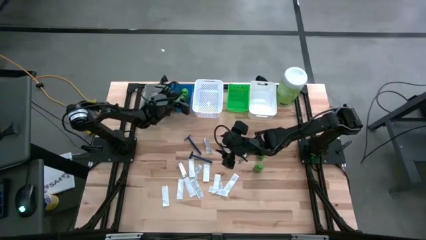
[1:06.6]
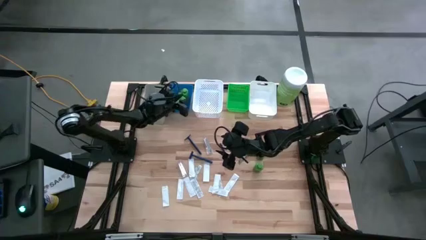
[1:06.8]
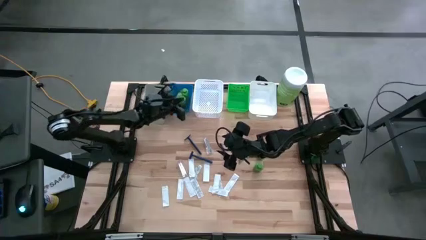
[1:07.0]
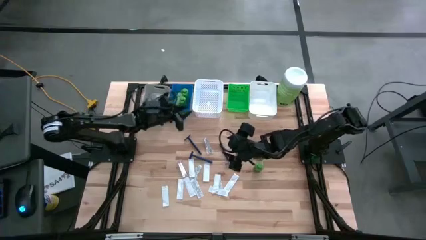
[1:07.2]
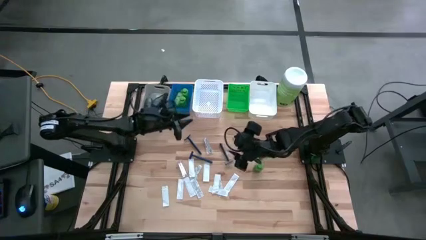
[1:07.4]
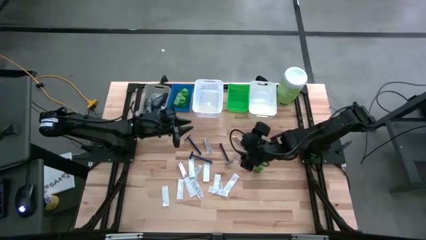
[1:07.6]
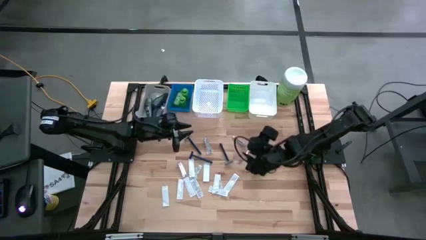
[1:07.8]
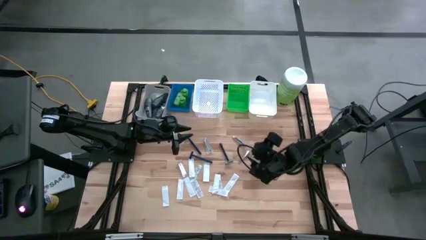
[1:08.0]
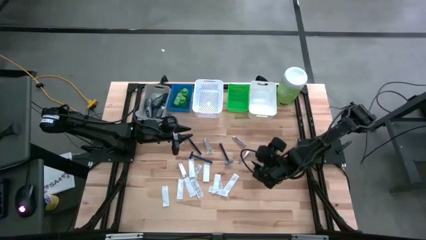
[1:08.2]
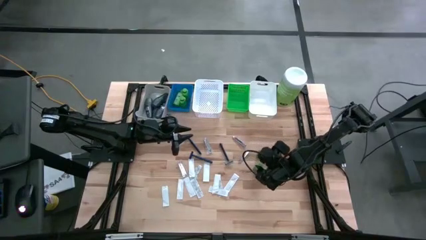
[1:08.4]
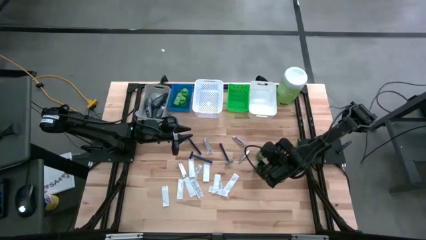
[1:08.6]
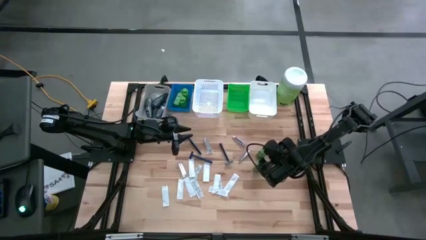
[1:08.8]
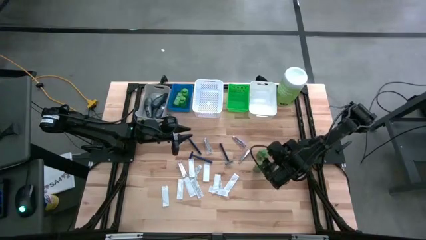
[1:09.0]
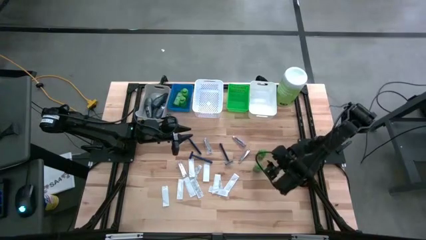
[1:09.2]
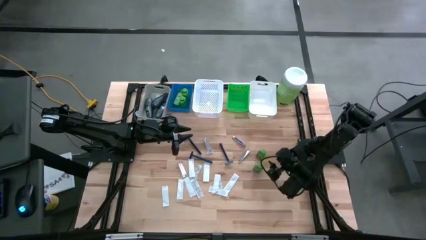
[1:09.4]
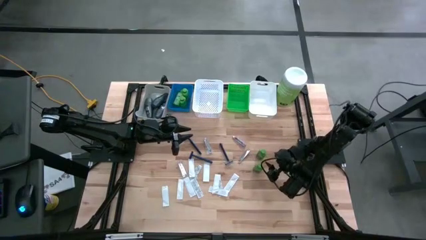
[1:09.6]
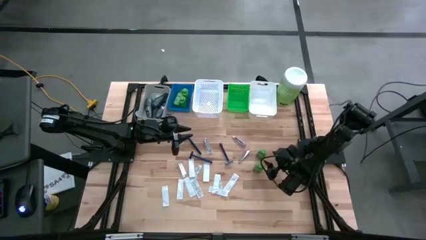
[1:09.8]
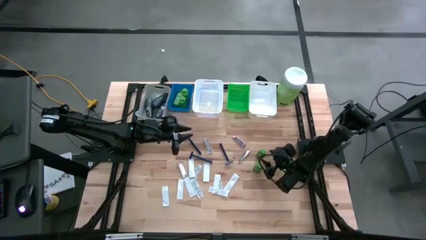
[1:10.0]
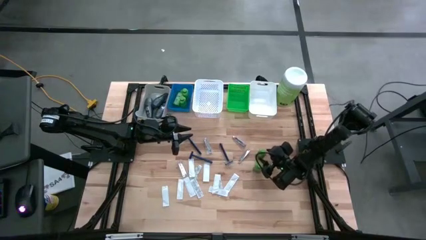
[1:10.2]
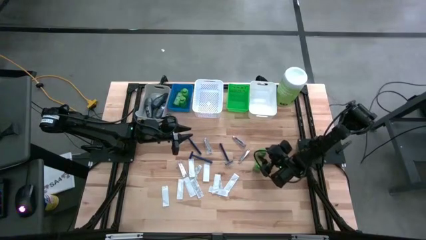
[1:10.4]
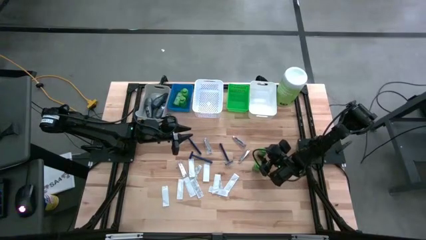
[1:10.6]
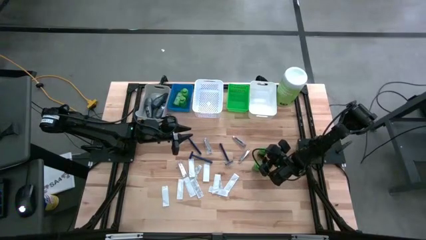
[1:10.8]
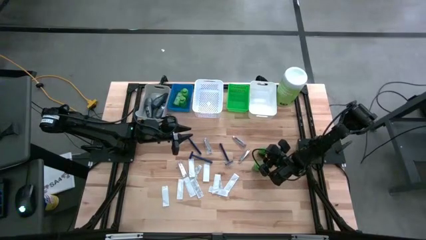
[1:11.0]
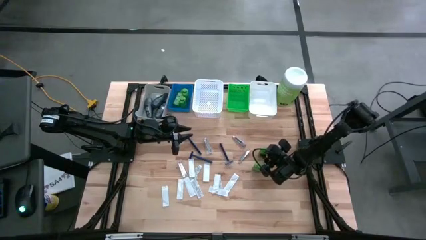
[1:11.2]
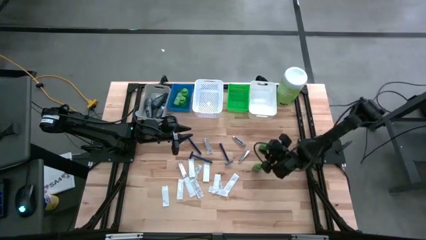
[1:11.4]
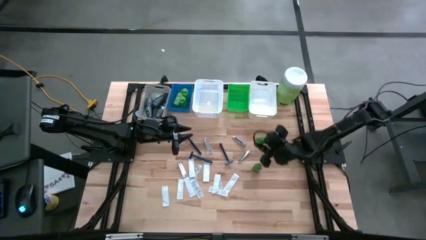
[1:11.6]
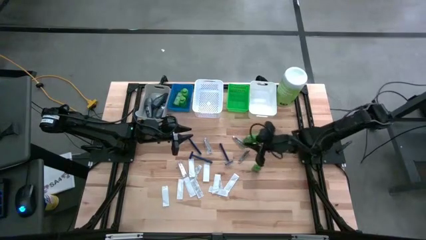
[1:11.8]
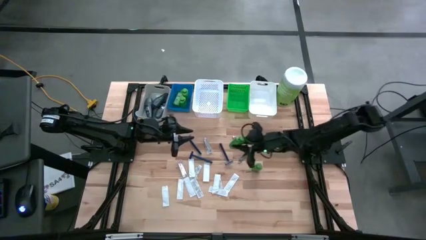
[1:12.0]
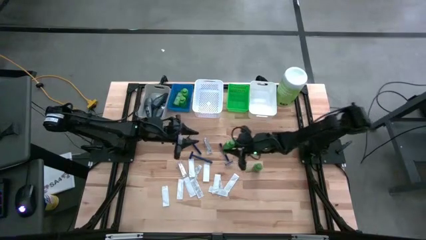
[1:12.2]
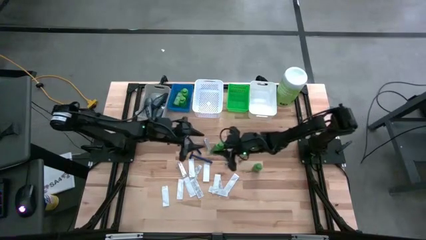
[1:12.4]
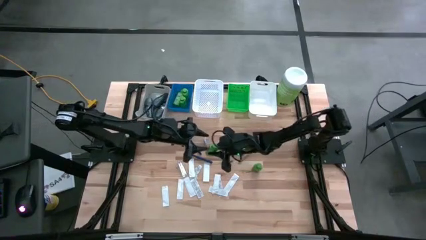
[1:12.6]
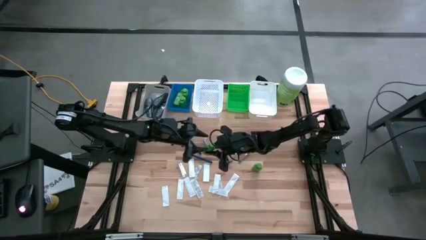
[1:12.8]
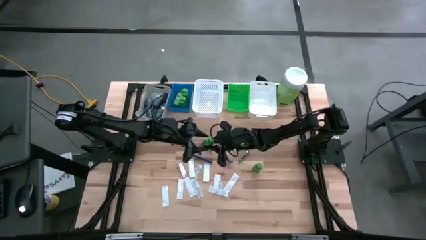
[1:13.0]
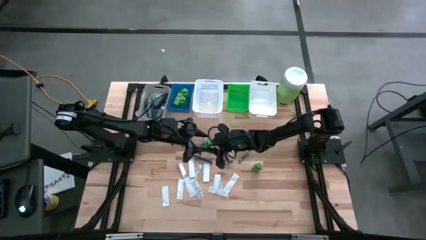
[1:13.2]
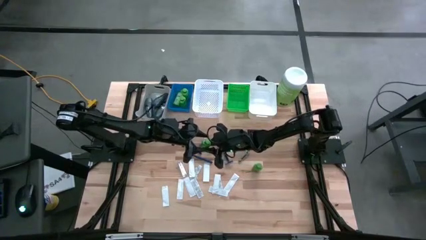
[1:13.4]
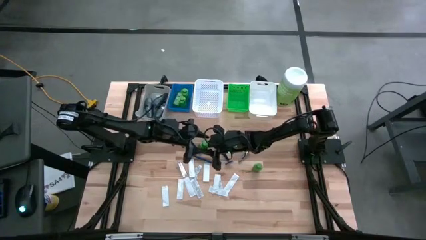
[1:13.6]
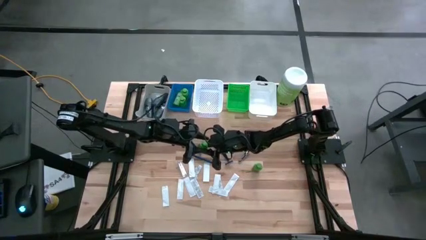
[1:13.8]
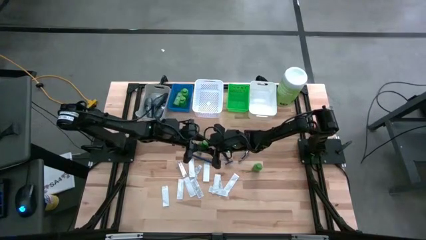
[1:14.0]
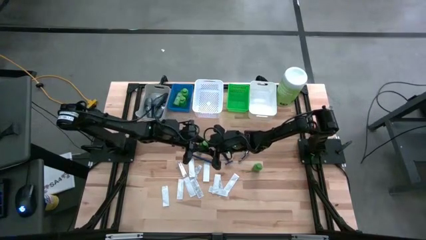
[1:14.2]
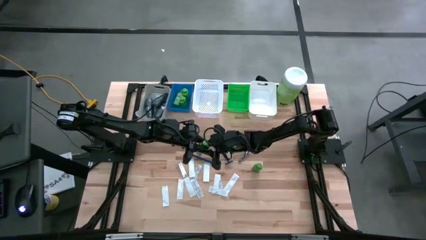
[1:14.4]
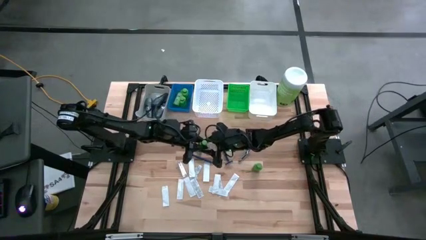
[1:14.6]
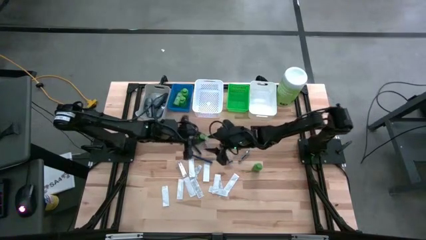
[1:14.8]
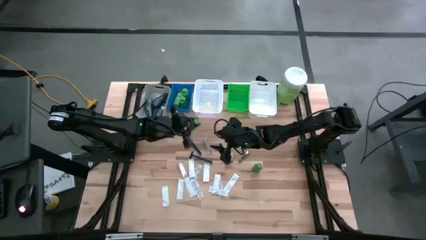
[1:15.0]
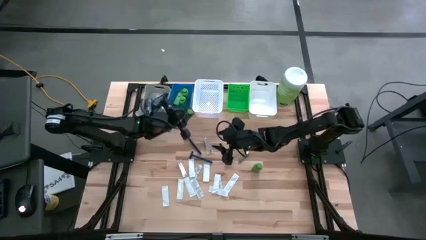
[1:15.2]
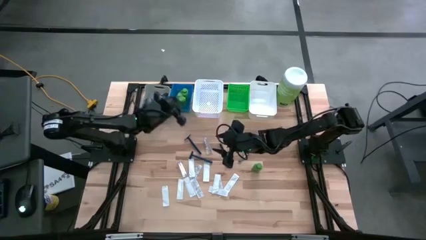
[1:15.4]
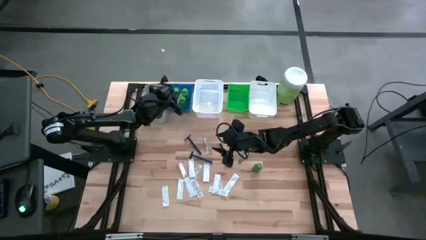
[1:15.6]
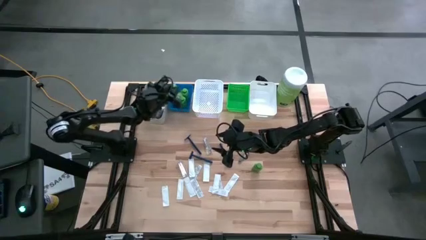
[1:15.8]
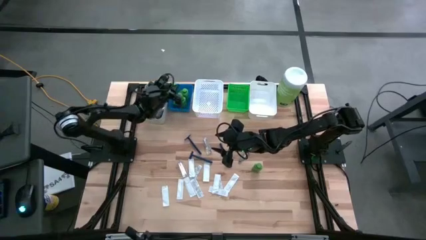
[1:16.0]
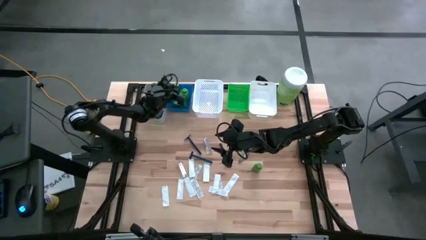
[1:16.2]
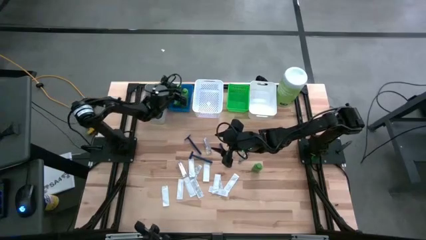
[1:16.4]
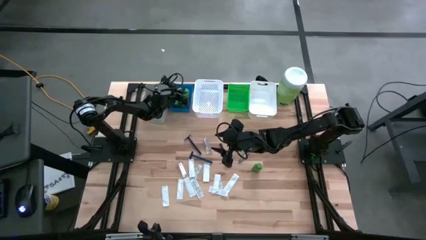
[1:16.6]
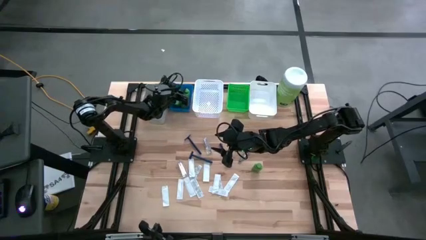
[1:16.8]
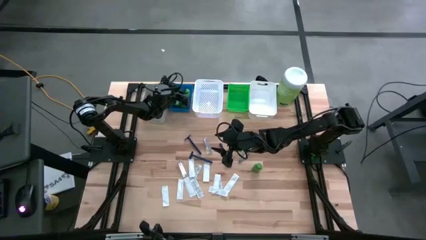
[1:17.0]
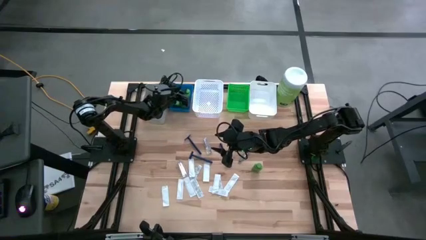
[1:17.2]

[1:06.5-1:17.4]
Task: Pick & Place Travel size toiletries
Put the shampoo into the blue bin
